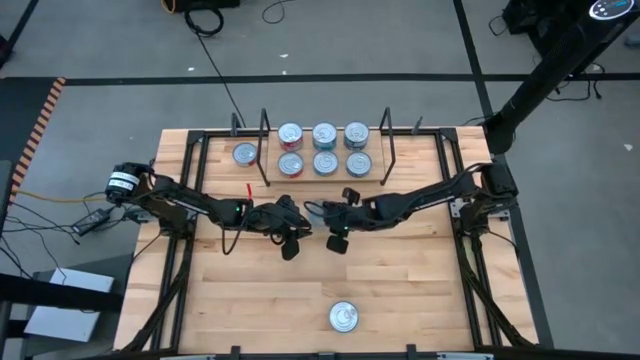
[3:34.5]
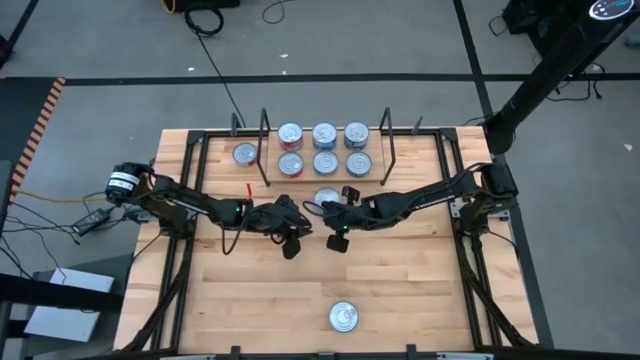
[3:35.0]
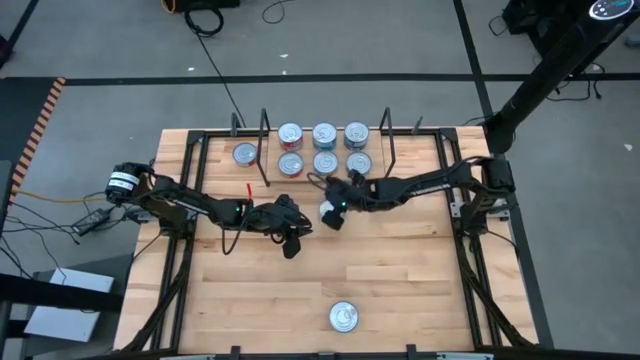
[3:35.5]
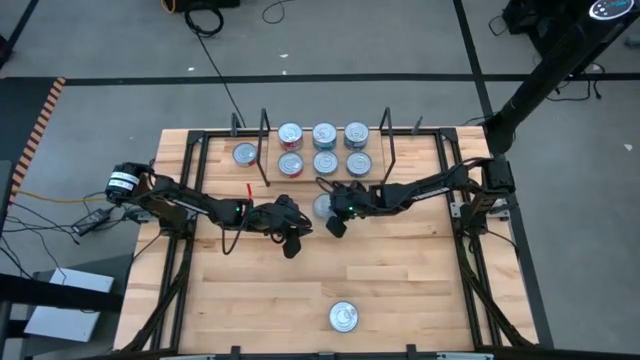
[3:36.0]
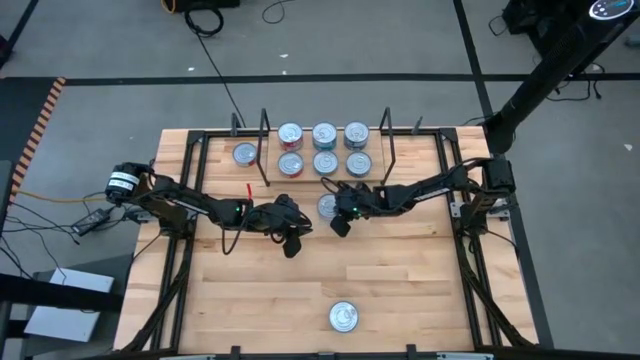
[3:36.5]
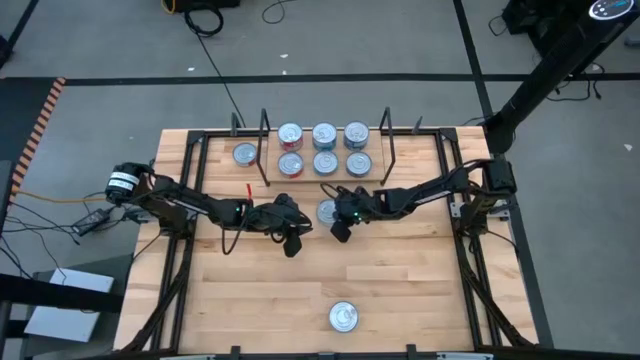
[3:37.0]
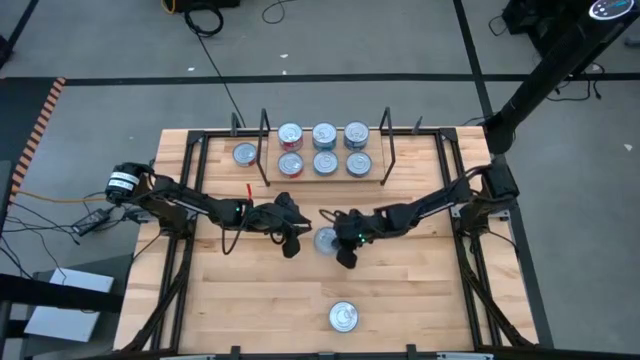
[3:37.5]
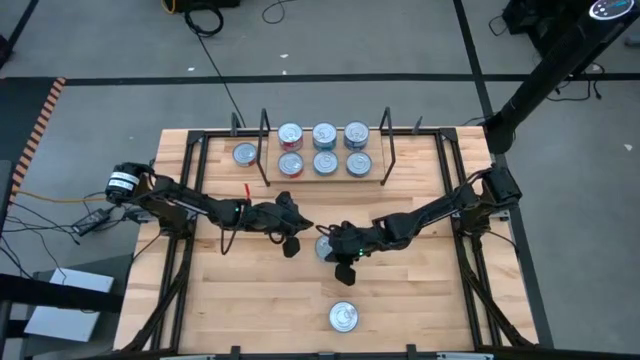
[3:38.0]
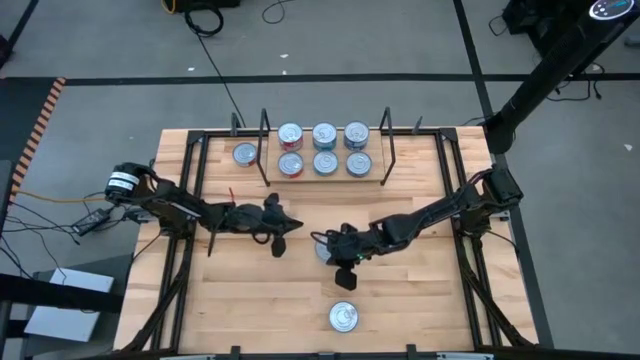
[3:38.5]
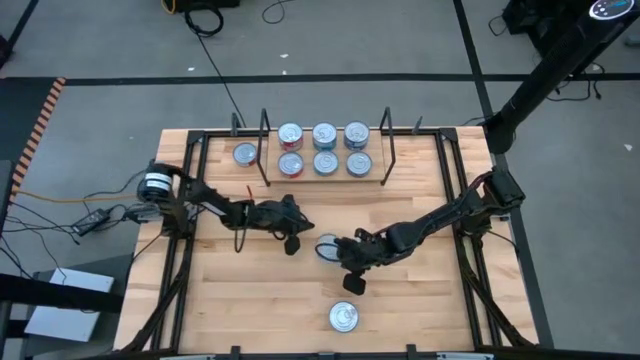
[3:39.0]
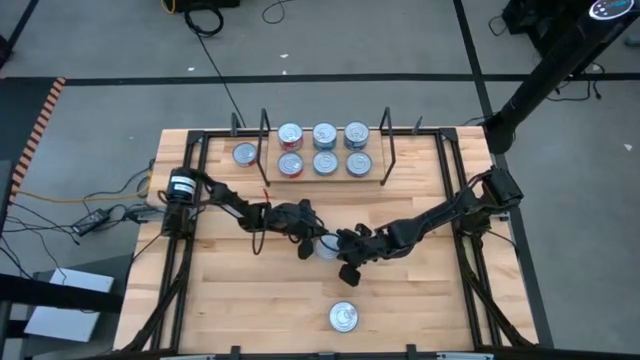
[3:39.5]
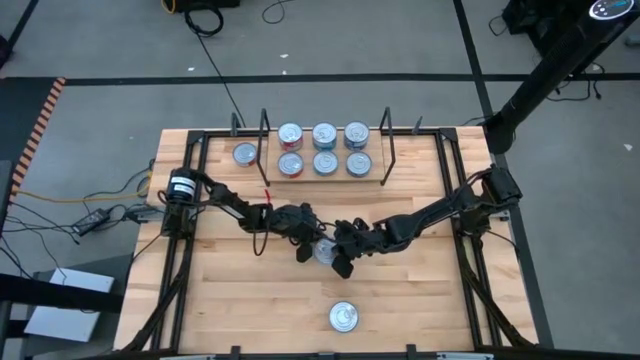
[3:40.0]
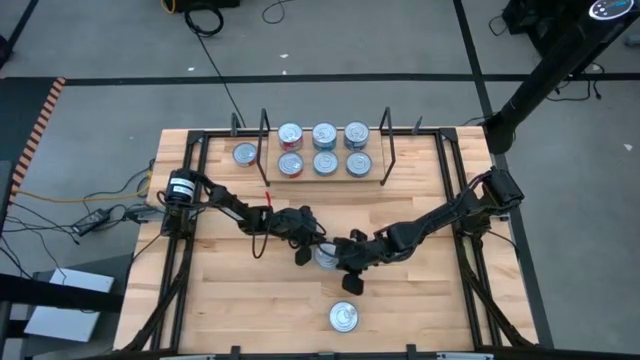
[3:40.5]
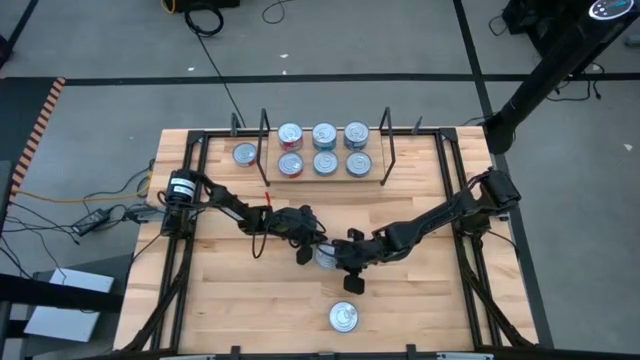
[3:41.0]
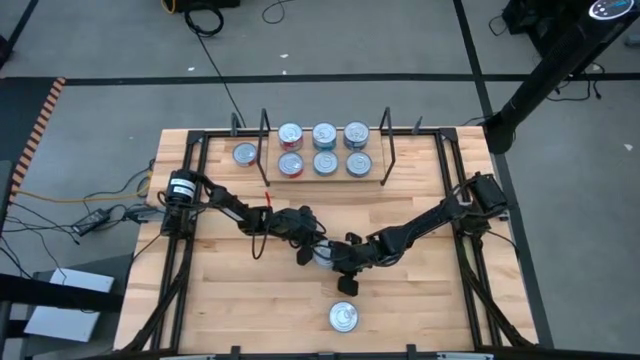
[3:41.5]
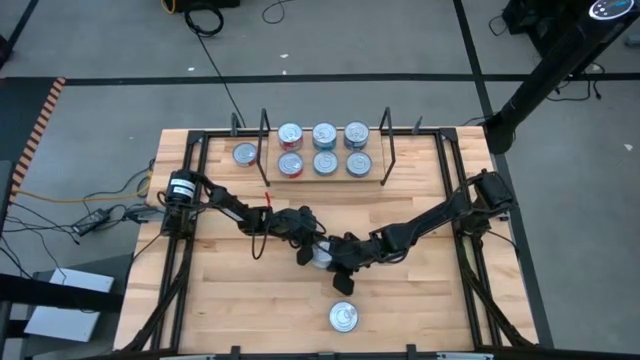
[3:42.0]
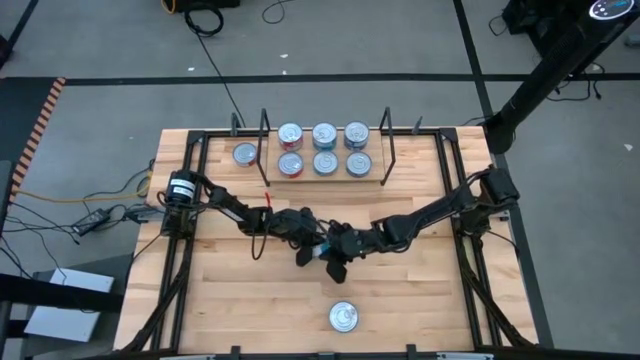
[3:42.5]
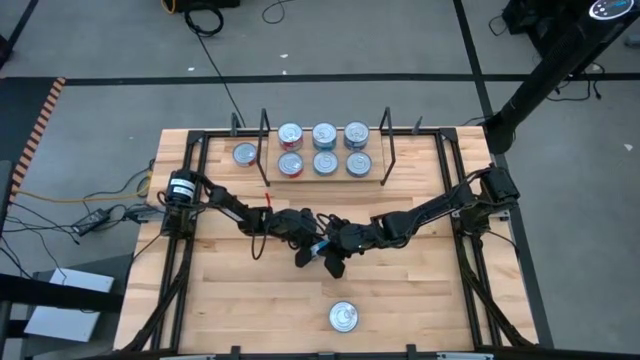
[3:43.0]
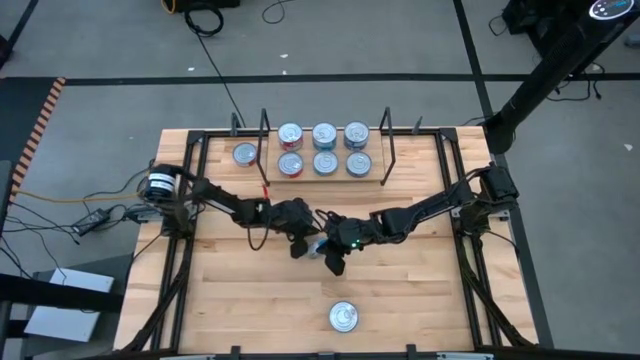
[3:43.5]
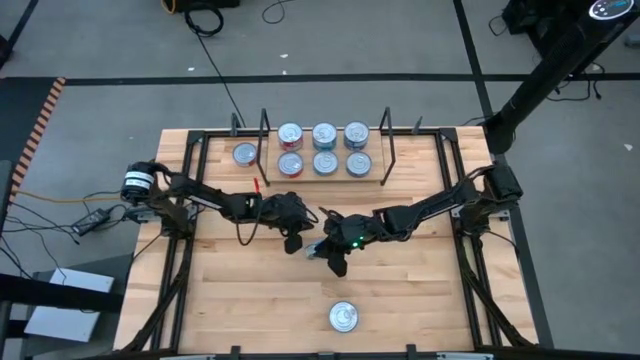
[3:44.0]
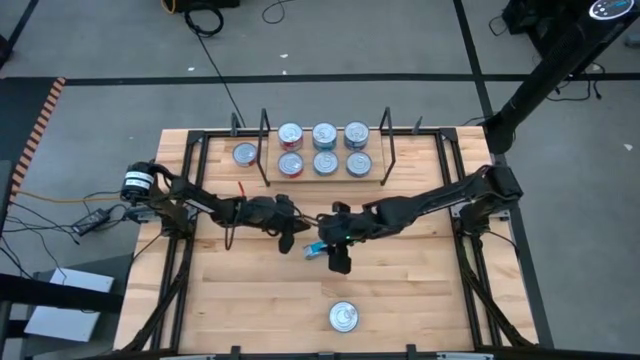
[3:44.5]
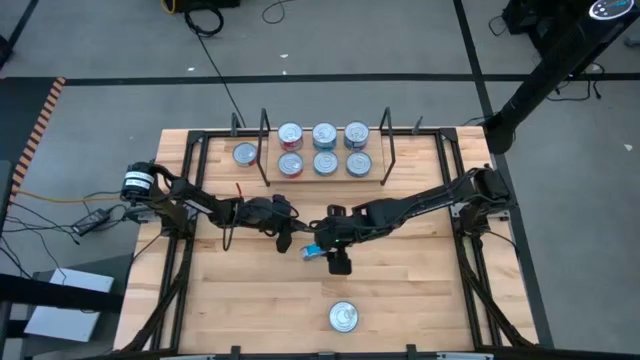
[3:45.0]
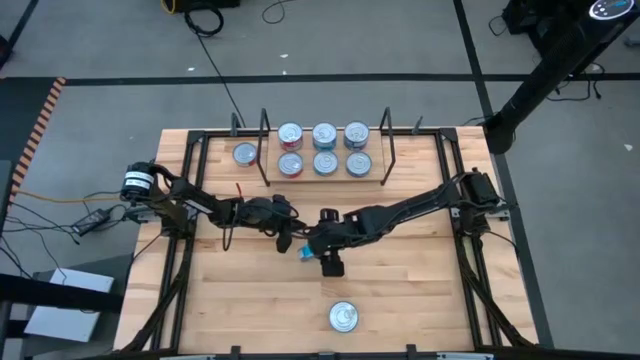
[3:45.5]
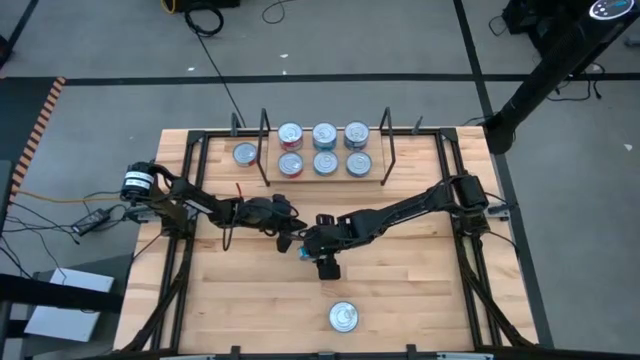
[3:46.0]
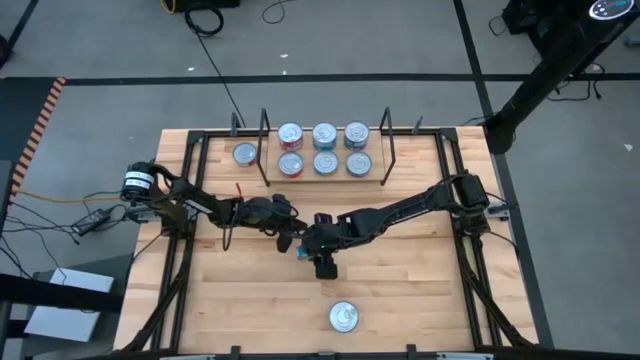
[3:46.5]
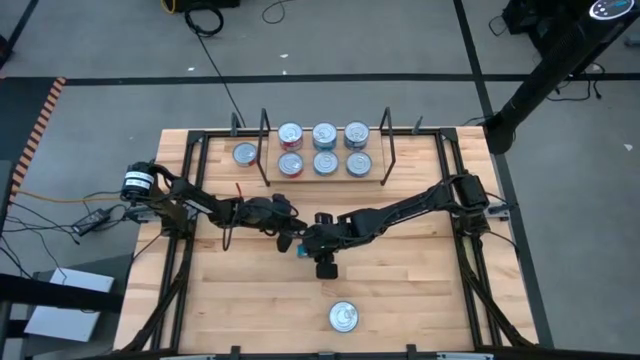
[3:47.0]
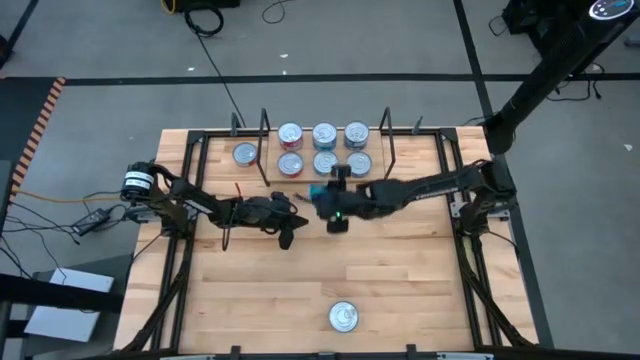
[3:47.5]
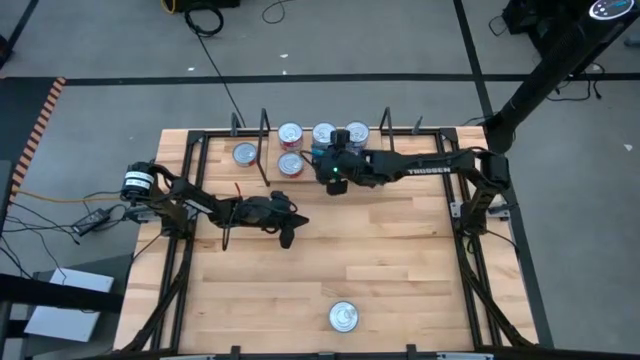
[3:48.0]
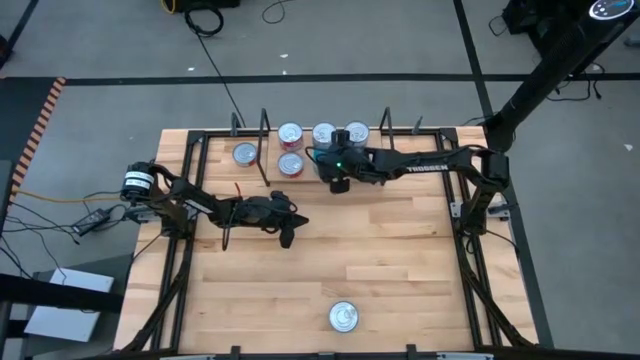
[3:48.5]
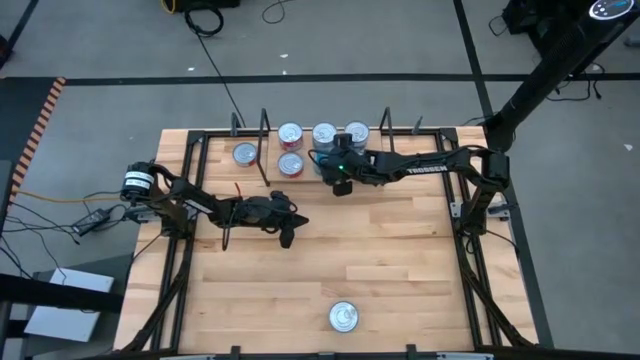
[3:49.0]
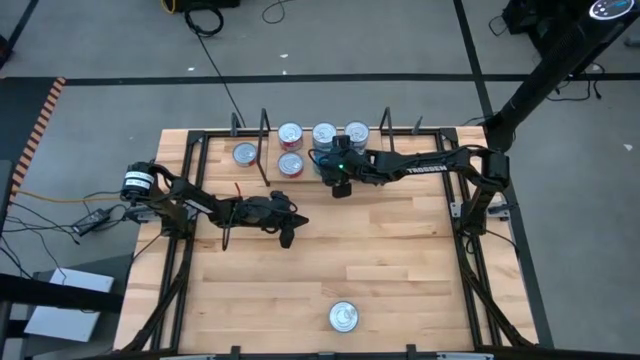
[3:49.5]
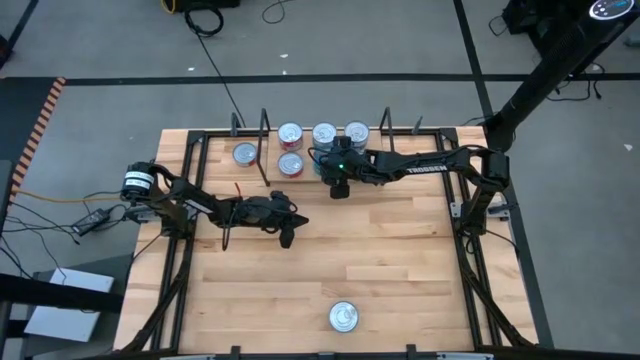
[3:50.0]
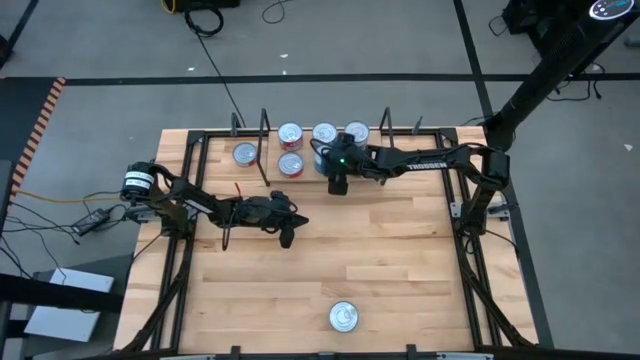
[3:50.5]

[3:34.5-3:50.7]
Task: Stack canned seafood by type on shelf
Stack the light blue tuna can on top of the other light blue tuna can

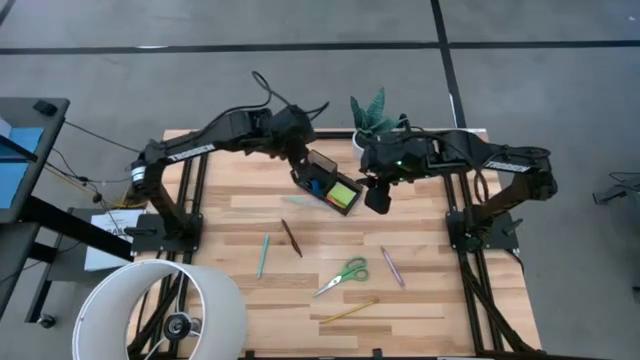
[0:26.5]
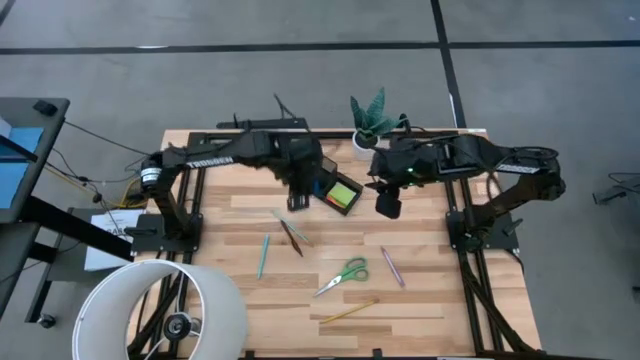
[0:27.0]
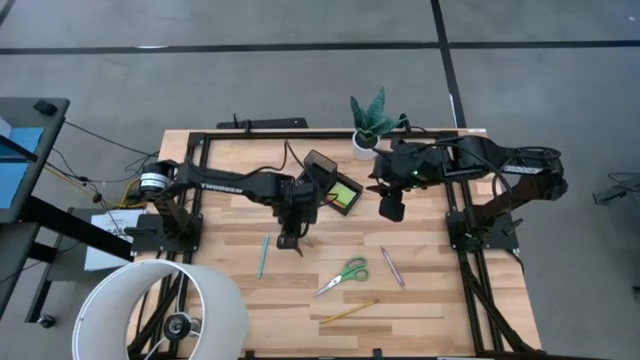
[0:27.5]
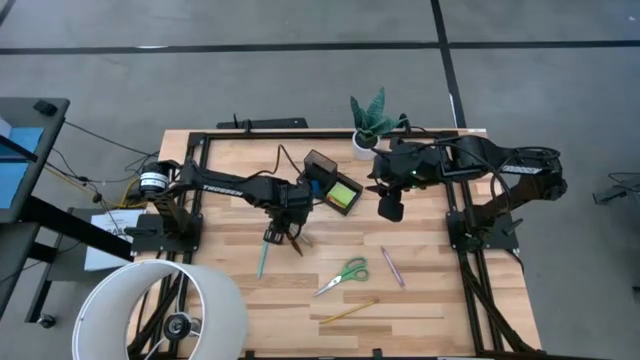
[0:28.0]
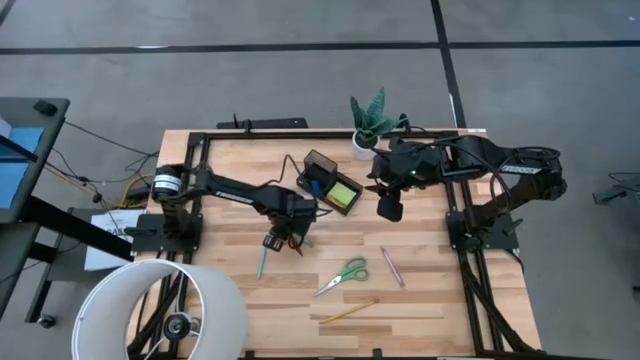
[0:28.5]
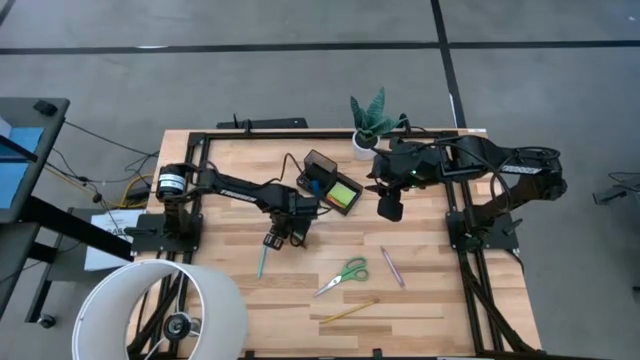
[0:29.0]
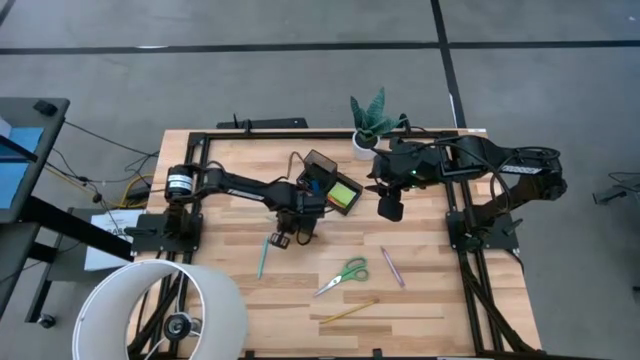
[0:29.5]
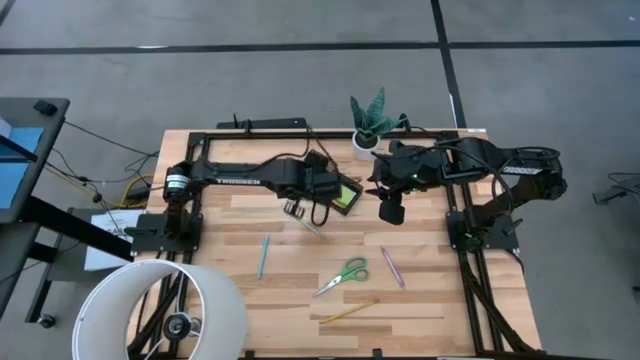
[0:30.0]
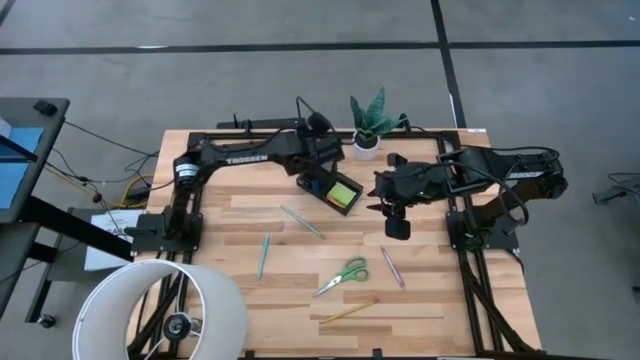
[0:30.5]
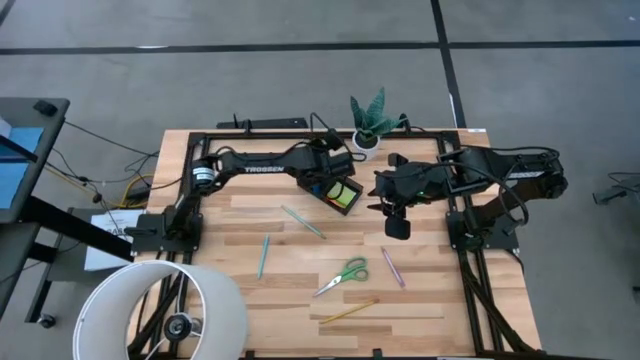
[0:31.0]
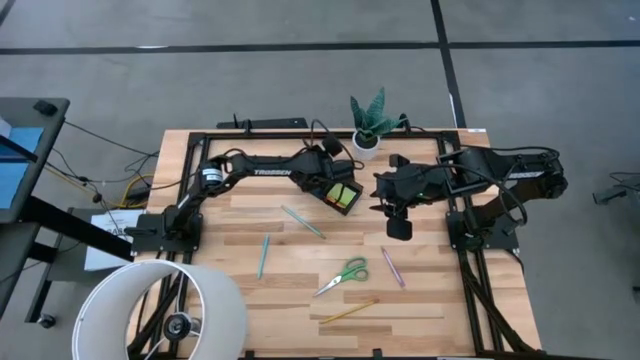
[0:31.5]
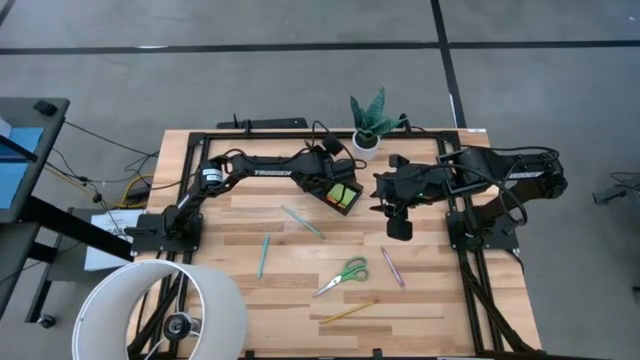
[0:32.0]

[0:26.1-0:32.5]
Task: Pick and place office supplies into organizer
Put the brown ballpen into the black desk organizer
